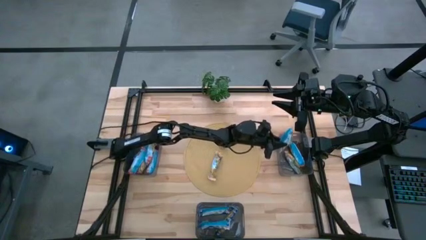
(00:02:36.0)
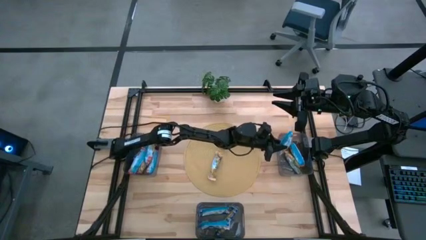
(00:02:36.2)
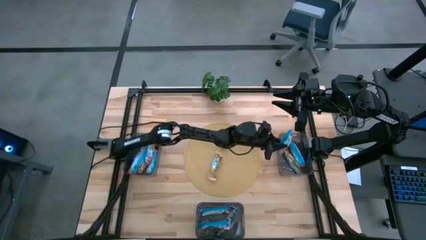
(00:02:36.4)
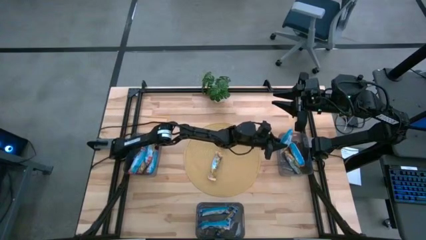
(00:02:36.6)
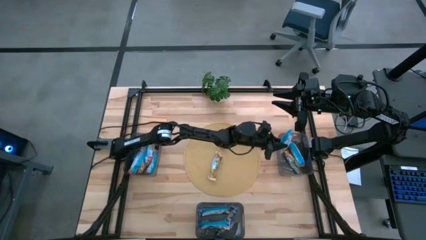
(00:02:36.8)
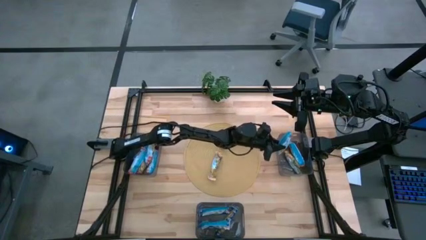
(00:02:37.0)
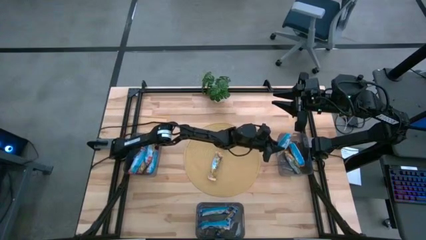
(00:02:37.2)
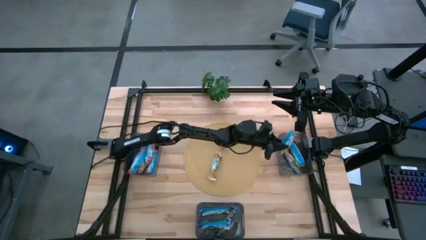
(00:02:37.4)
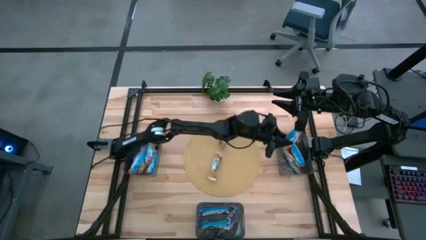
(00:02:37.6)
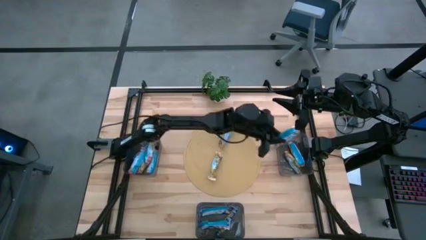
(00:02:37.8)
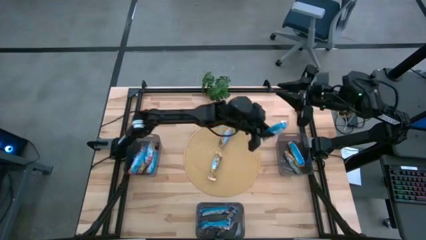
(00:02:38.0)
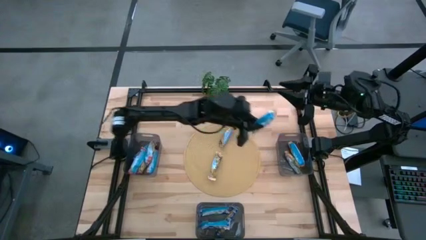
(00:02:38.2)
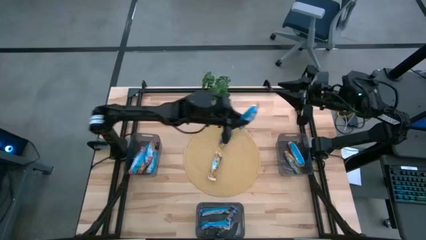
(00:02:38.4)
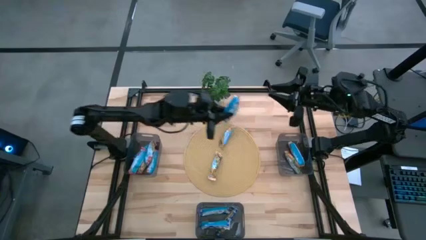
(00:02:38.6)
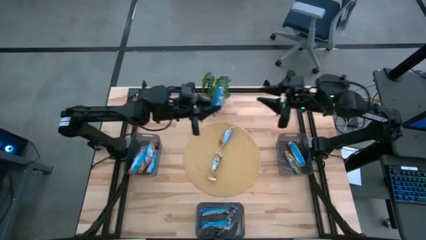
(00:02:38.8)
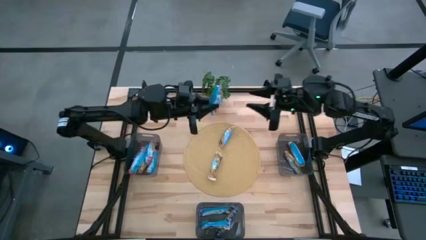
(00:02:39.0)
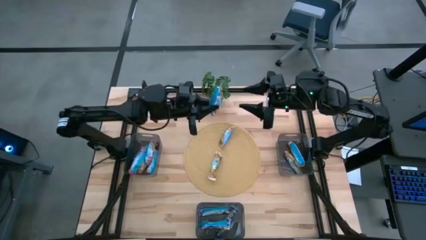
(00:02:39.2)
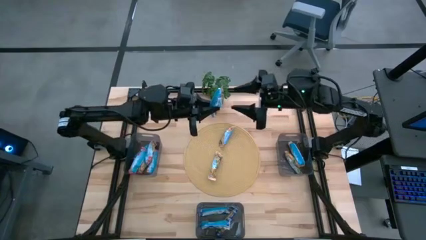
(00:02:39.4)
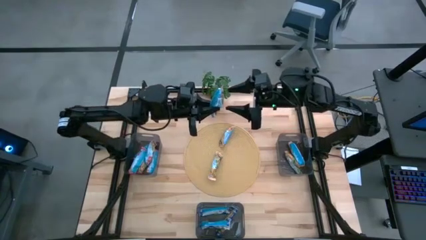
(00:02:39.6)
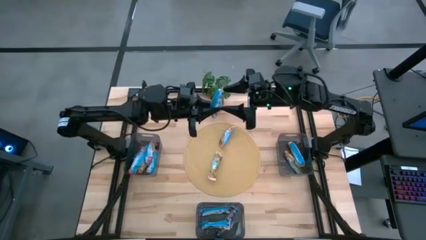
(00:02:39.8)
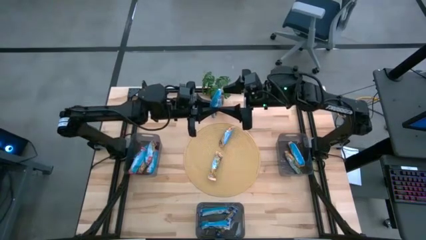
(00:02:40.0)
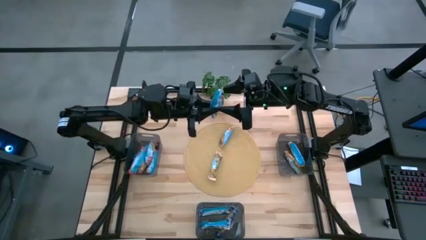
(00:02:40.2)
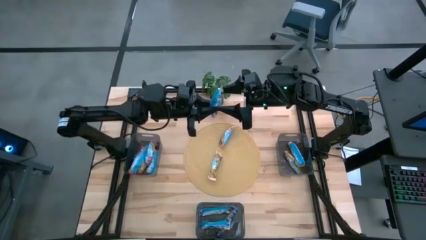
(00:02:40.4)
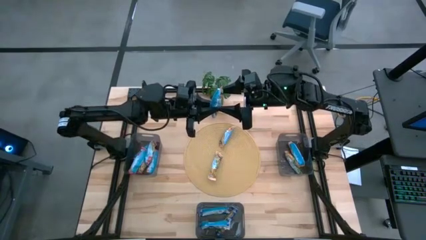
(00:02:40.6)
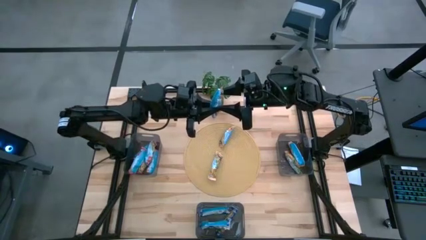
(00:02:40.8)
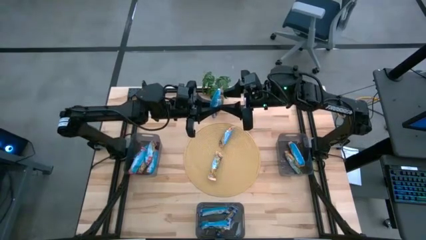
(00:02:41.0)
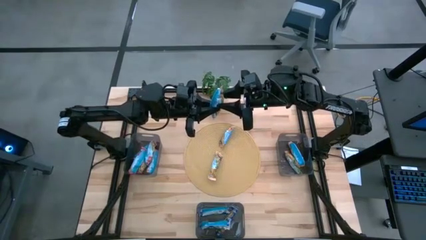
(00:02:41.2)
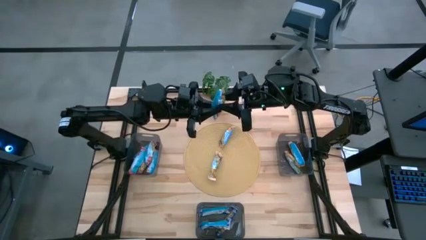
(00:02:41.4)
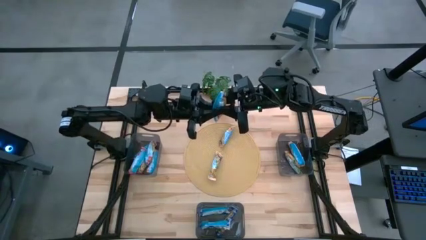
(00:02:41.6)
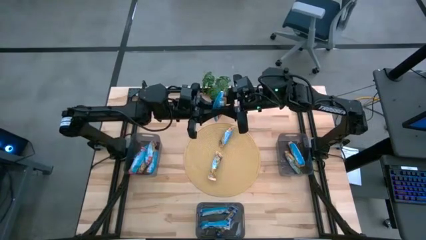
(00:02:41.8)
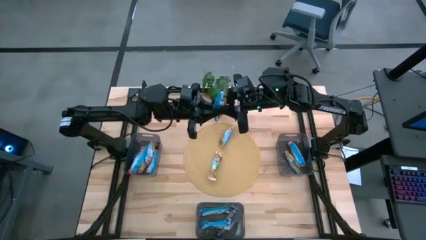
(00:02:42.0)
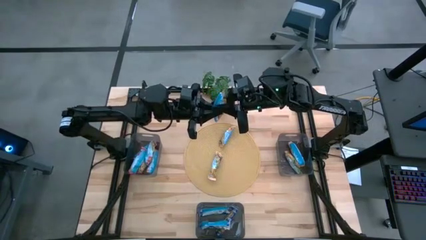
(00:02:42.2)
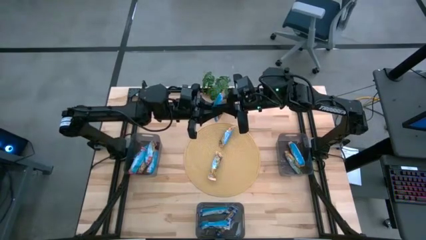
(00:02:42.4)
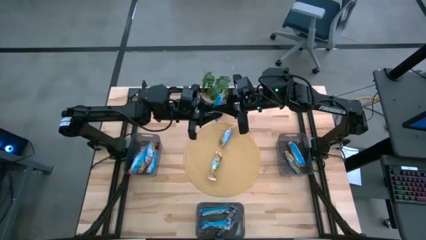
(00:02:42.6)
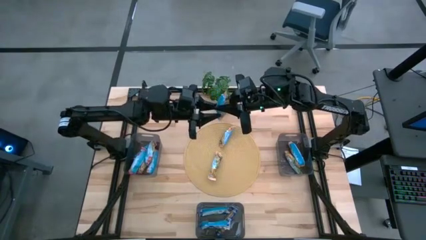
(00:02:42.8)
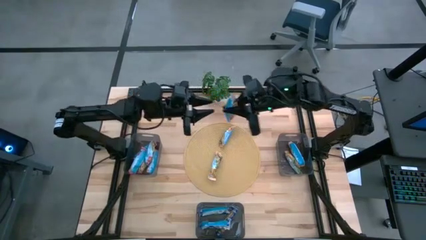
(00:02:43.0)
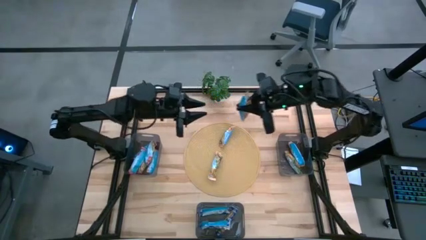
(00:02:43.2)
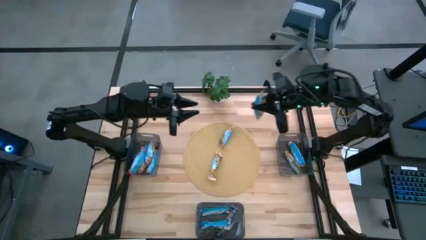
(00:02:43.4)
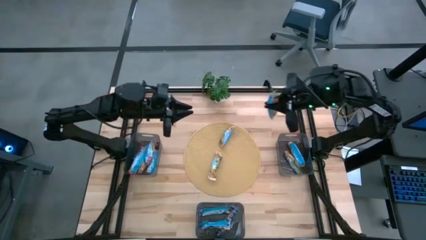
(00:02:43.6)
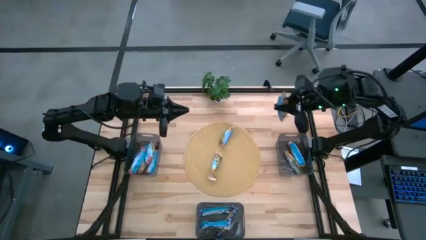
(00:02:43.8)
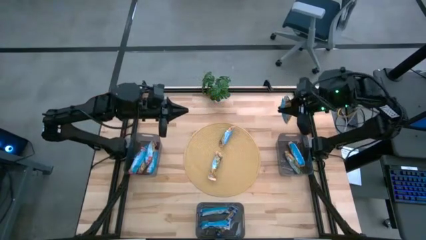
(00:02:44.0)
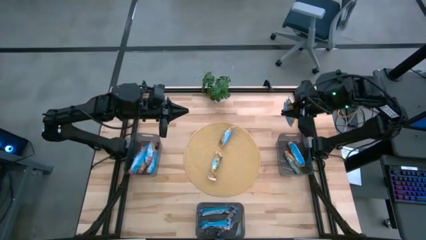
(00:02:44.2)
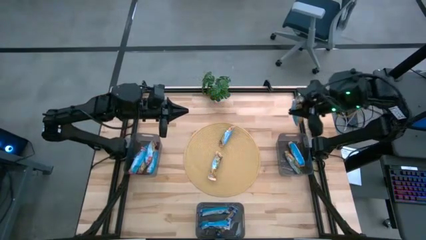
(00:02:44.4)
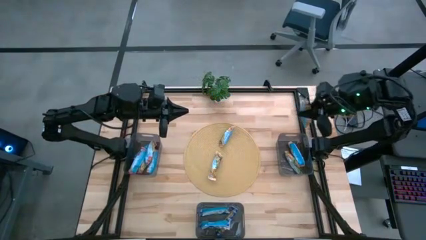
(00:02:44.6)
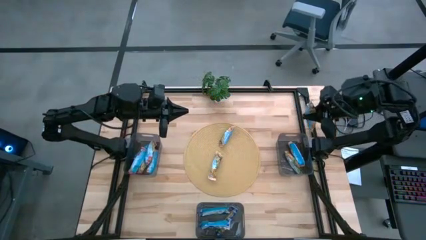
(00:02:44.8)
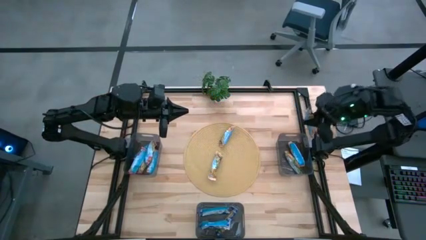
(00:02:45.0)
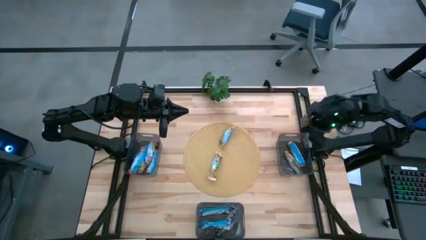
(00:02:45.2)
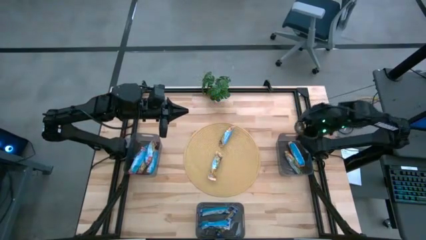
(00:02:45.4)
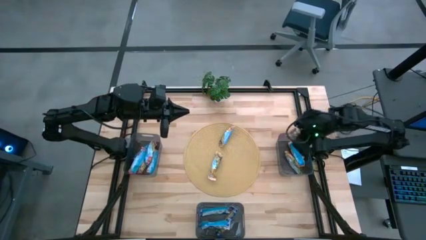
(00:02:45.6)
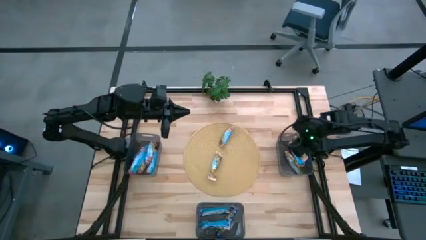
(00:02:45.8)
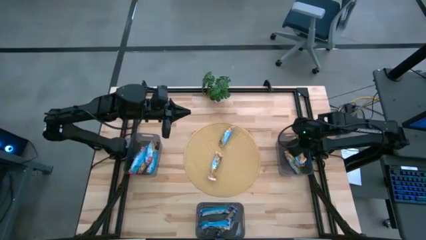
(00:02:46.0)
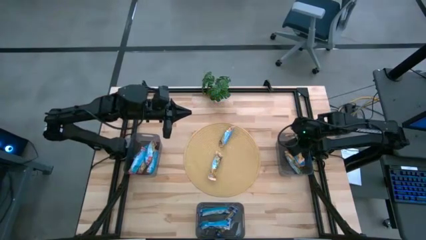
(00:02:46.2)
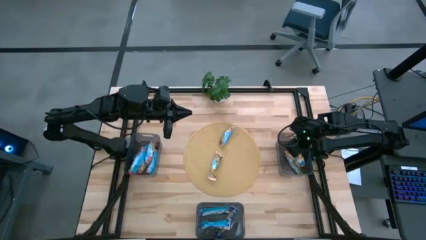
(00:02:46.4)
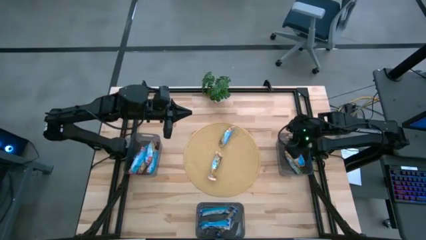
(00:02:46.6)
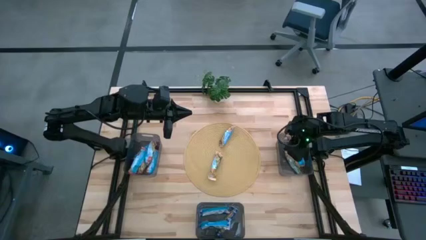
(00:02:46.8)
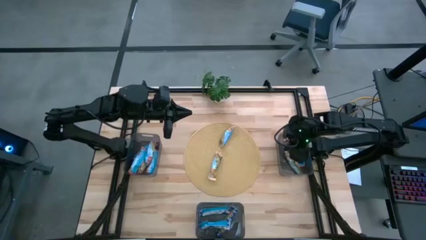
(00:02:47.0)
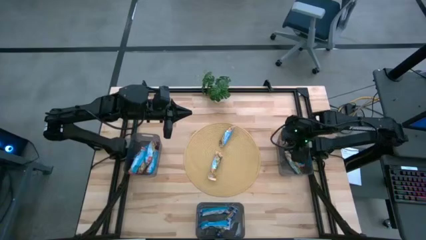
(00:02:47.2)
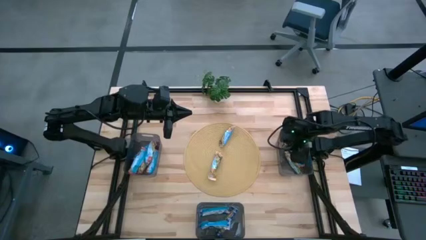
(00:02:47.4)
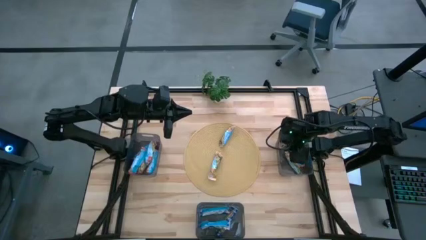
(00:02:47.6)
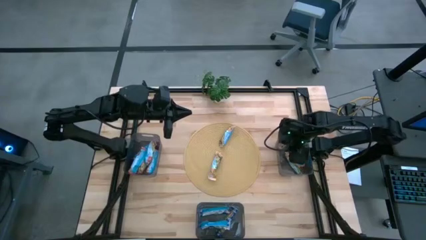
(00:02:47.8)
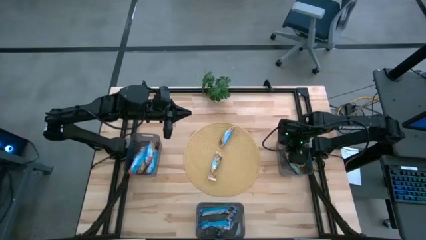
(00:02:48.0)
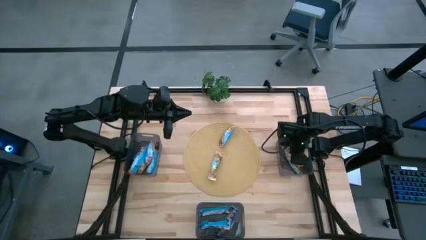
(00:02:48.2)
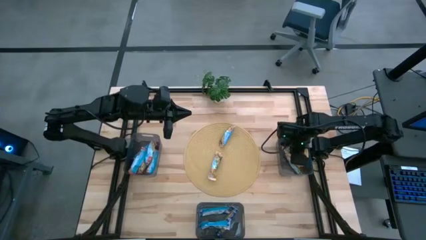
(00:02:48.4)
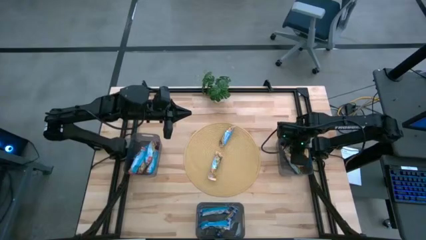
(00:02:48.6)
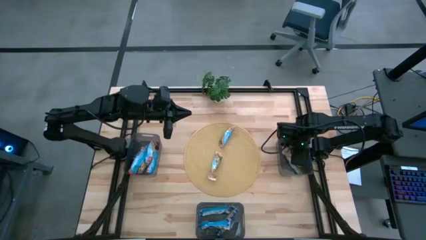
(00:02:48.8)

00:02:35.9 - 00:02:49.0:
Task: Pick and place Granola Bars by type
Put the bottom left yellow granola bar into the top right bin
